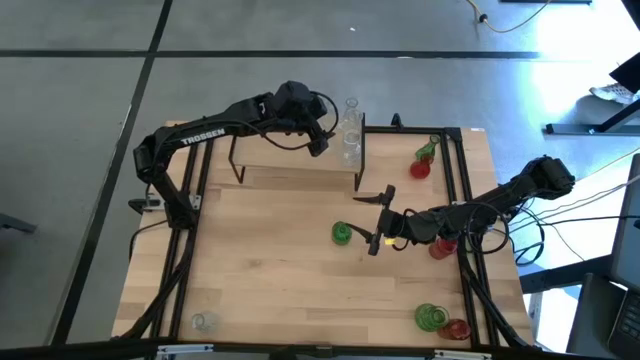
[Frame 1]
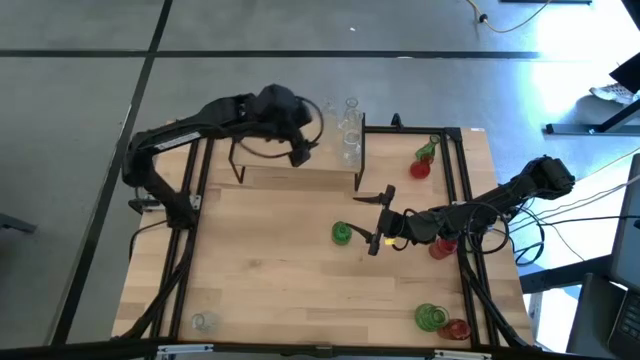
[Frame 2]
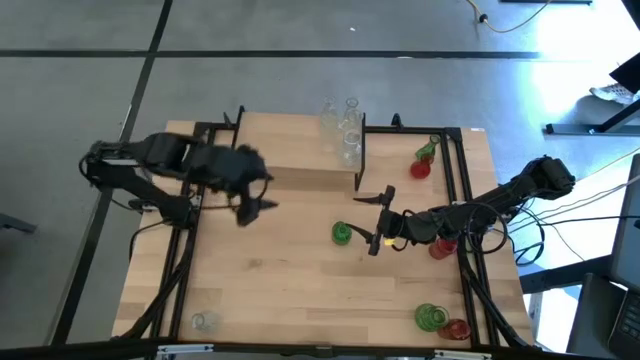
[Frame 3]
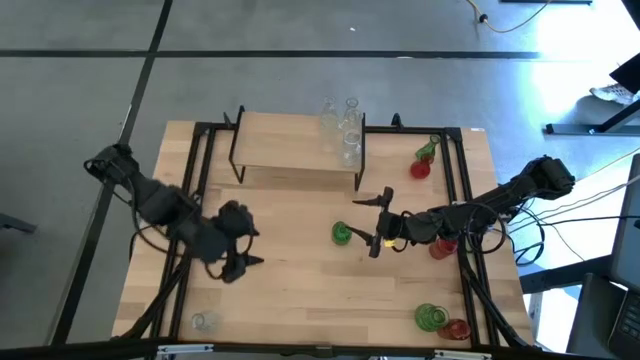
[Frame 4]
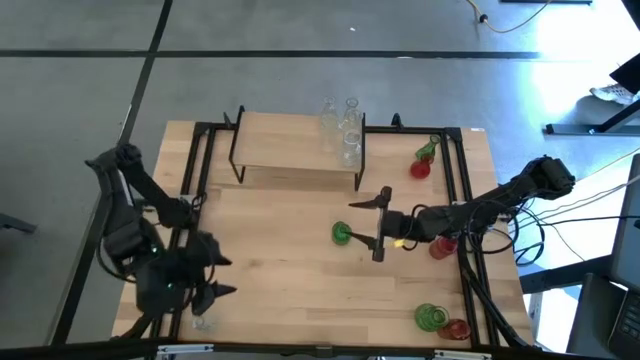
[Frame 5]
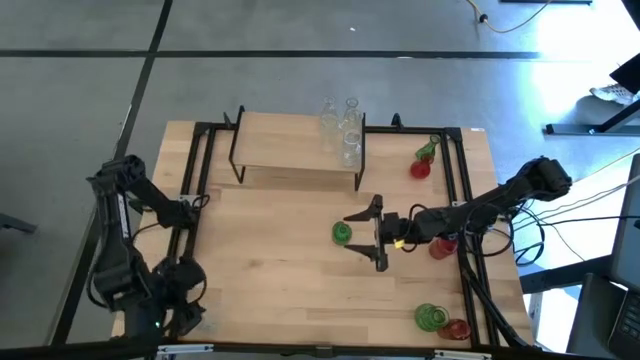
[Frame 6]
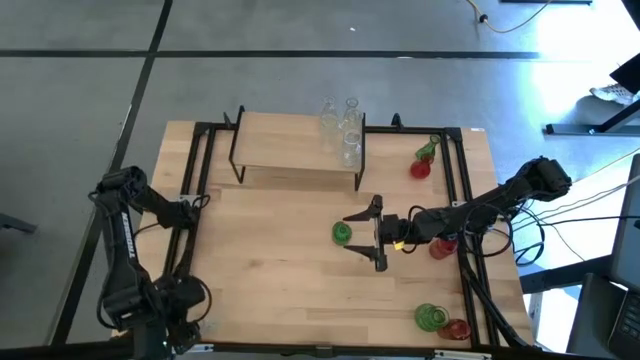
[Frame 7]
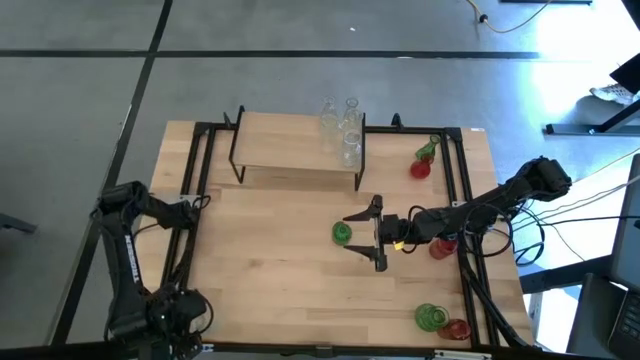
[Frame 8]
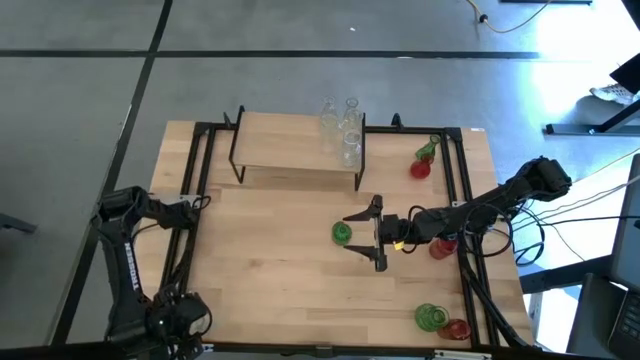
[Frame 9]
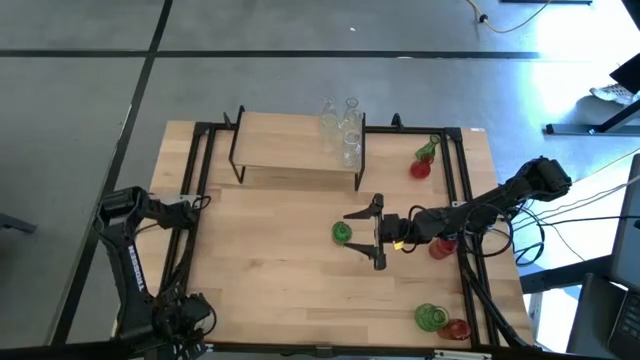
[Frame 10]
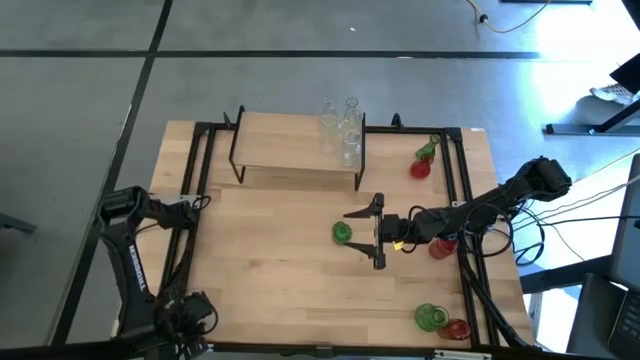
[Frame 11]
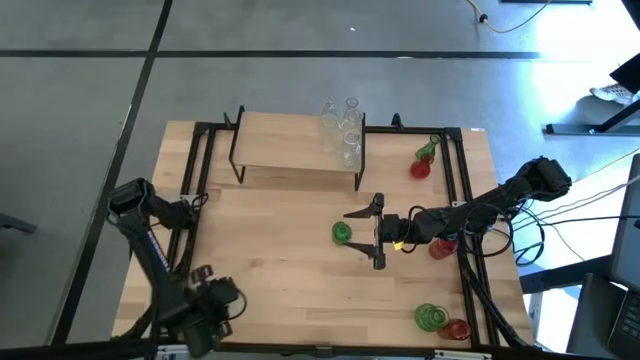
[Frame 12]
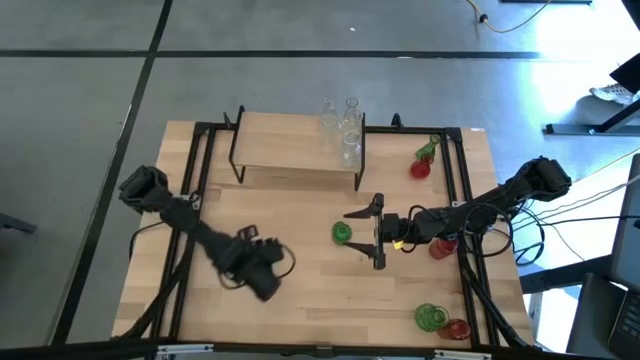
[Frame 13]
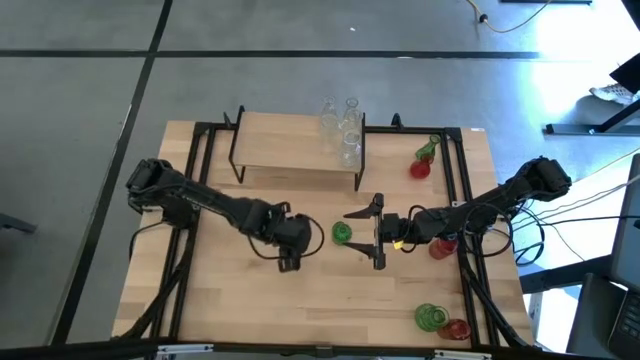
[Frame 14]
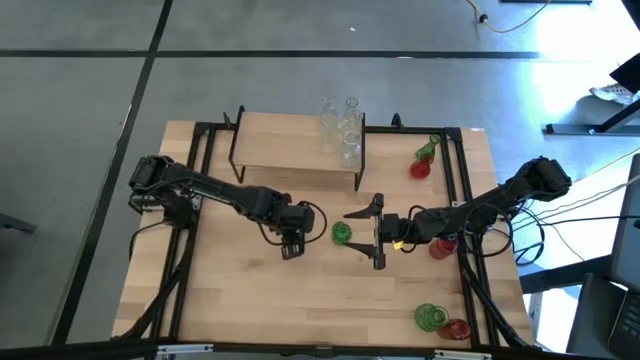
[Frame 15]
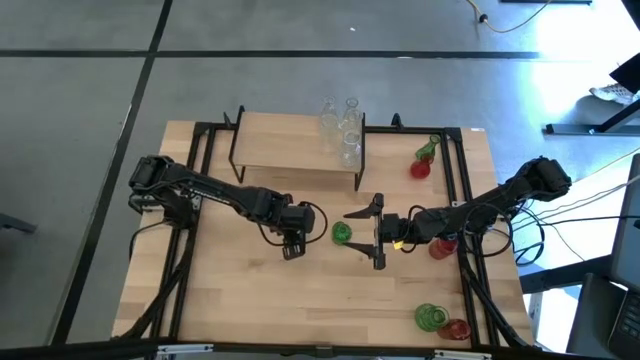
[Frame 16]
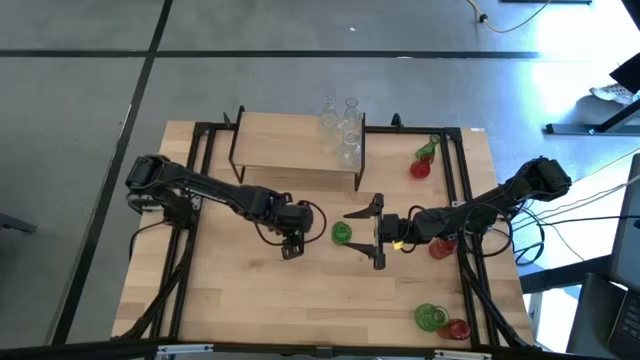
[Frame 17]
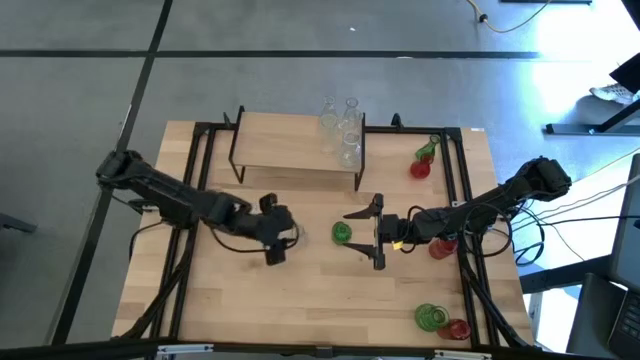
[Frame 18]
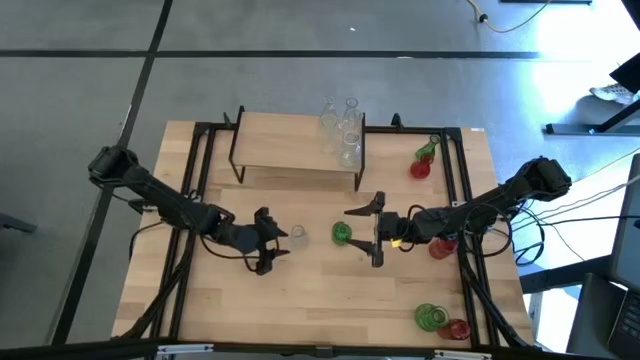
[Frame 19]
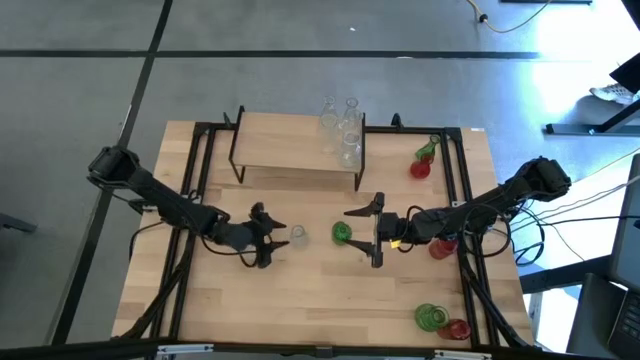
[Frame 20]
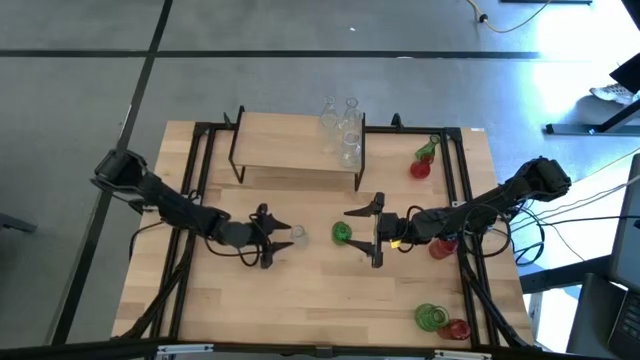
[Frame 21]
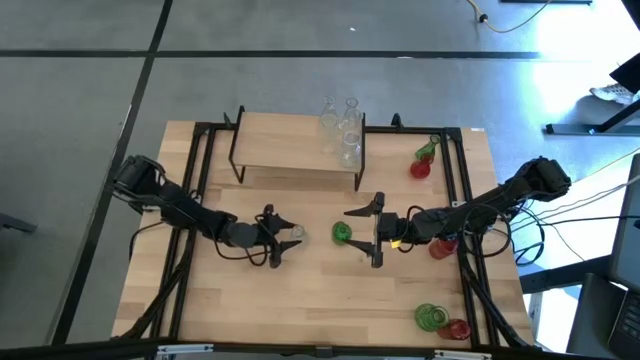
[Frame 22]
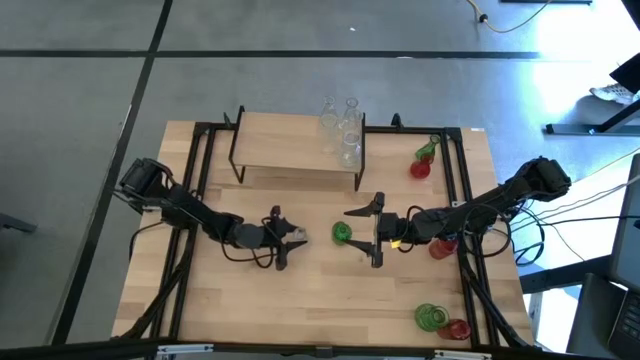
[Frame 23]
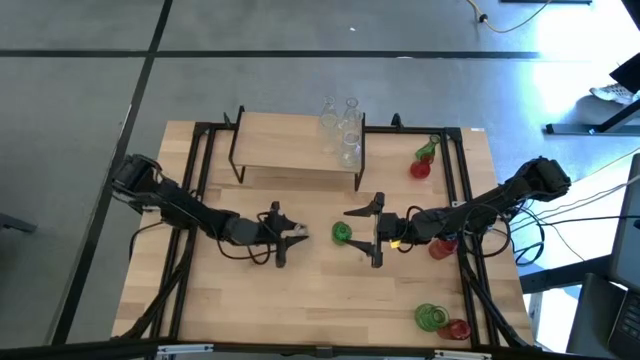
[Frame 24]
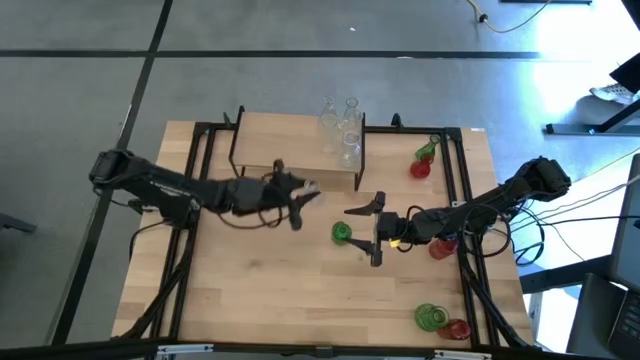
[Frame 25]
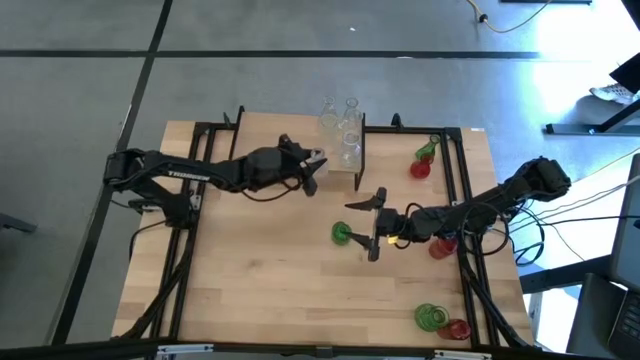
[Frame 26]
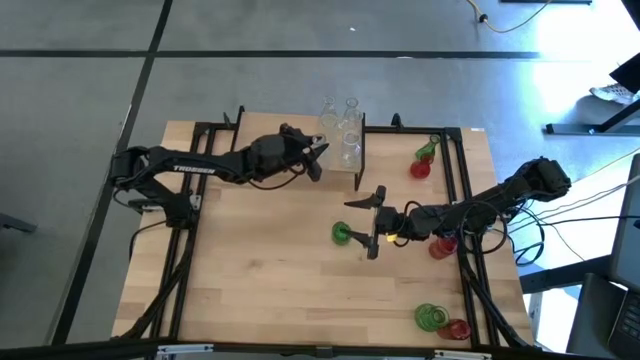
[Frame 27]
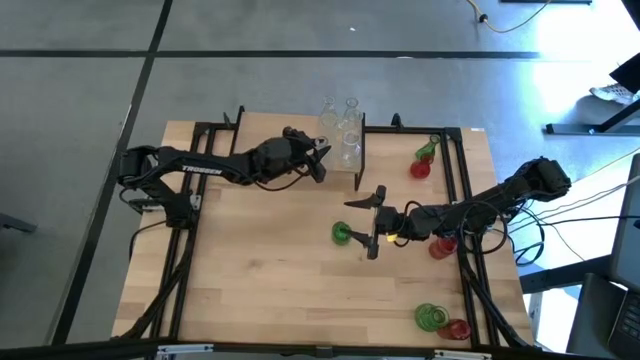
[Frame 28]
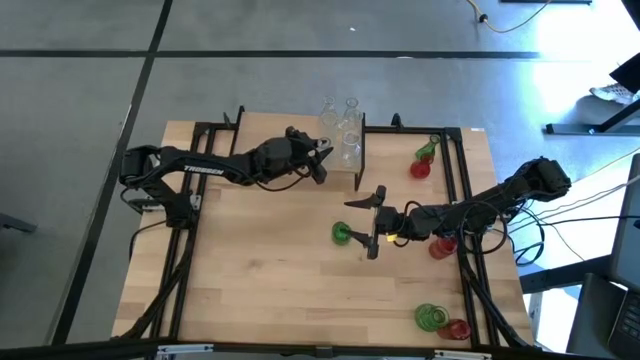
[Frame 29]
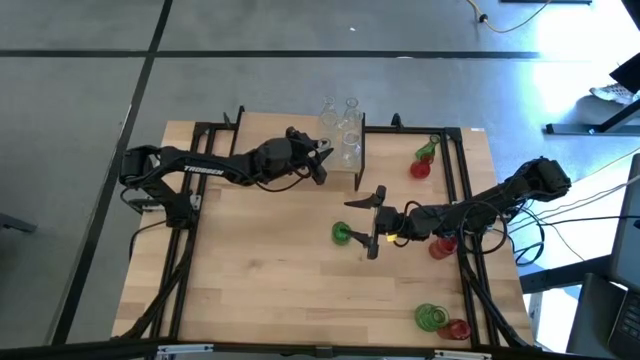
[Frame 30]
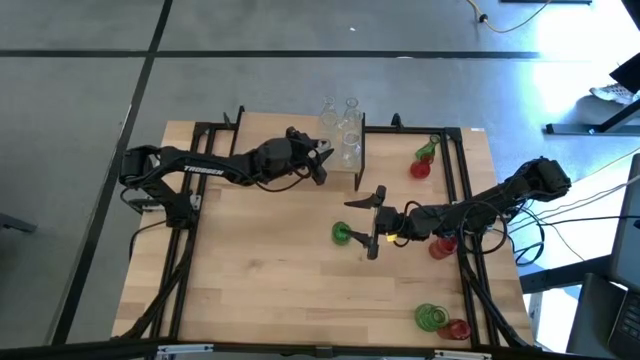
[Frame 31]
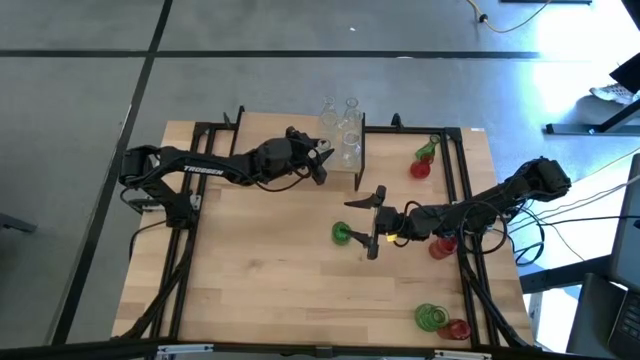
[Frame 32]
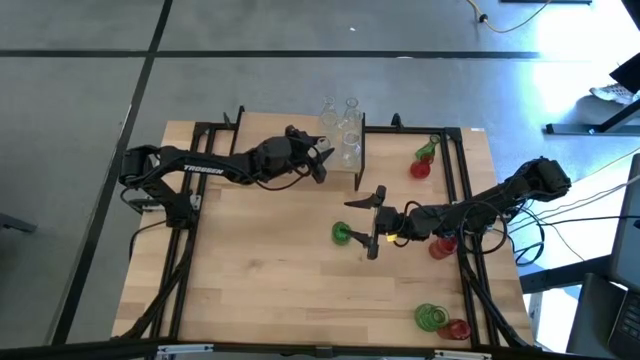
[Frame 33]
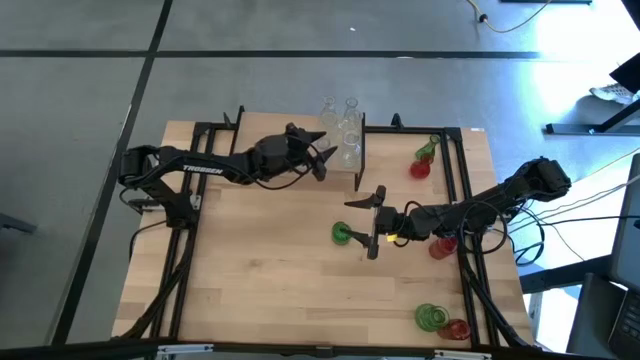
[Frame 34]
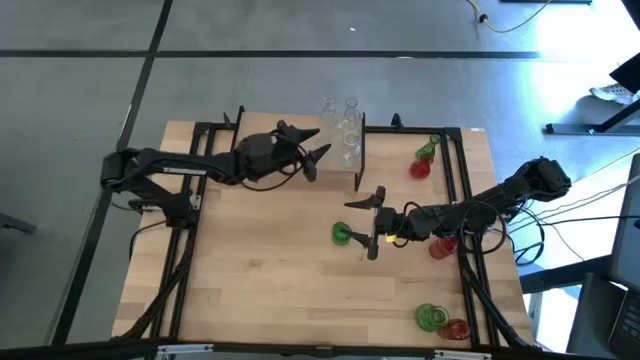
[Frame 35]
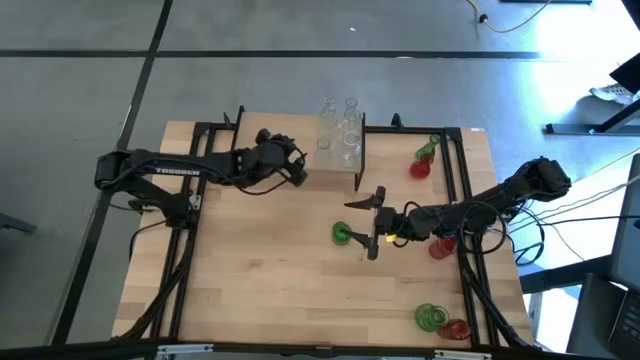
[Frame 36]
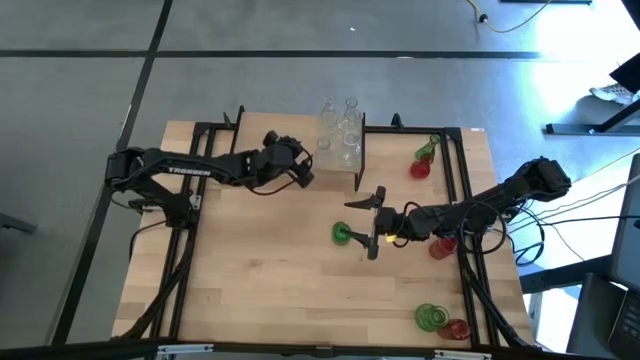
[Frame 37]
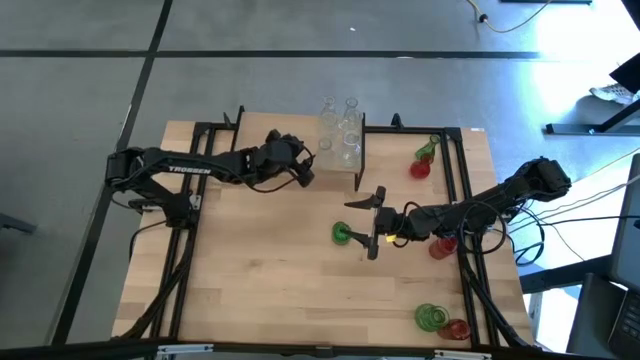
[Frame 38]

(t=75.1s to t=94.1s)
Task: sort vases onto shelf
Put the transparent vase aligned with the other transparent vases on the shelf

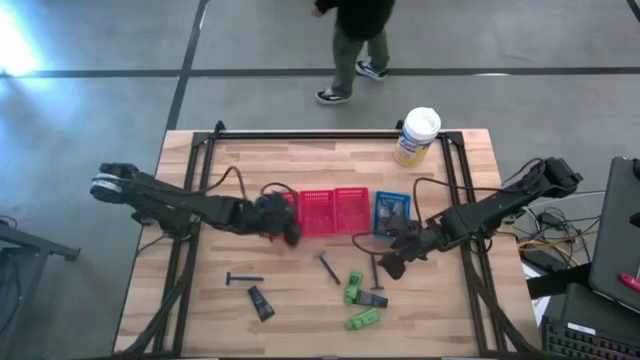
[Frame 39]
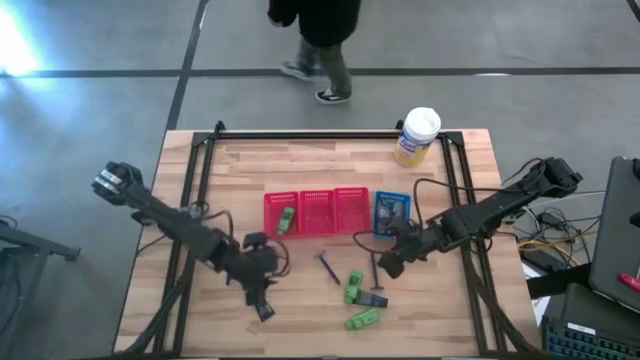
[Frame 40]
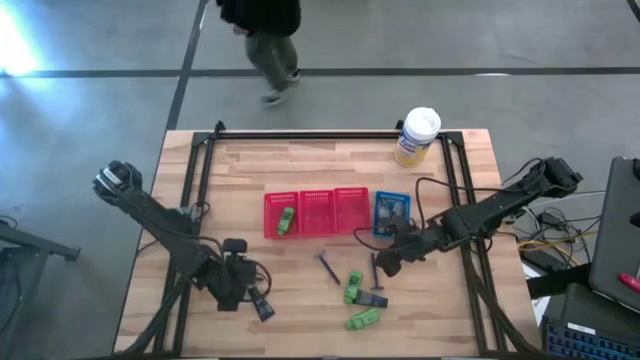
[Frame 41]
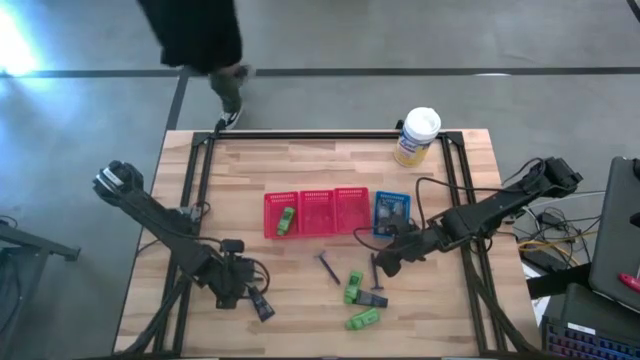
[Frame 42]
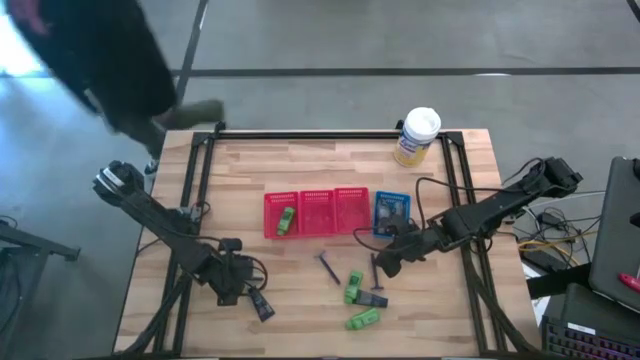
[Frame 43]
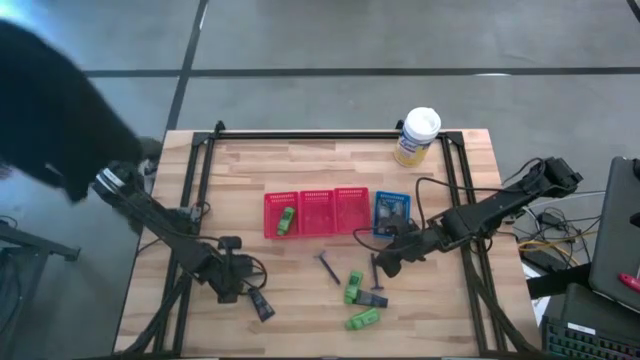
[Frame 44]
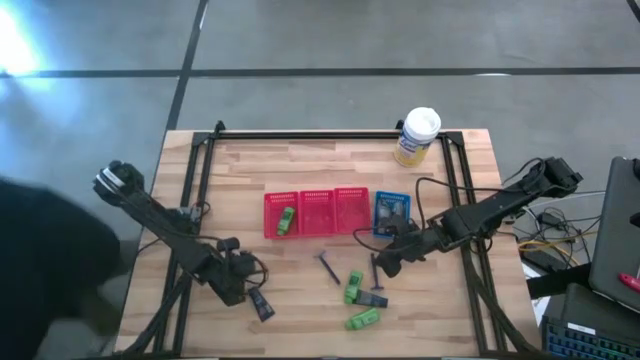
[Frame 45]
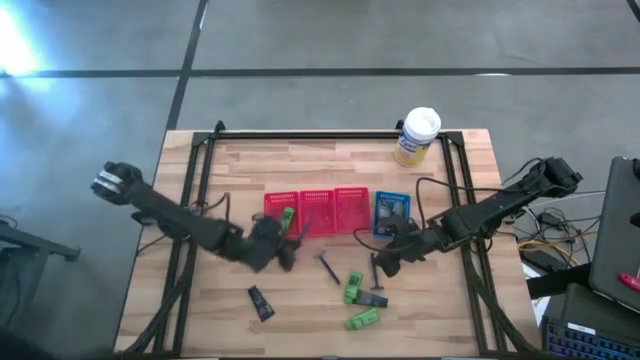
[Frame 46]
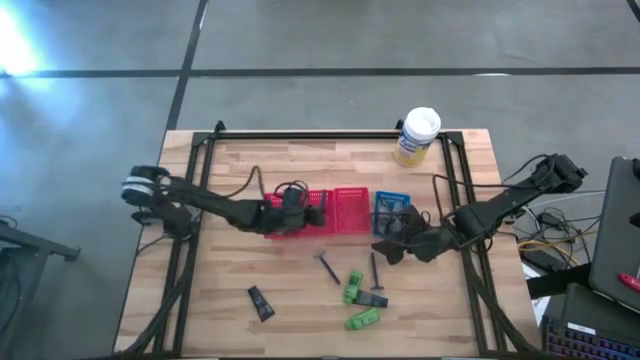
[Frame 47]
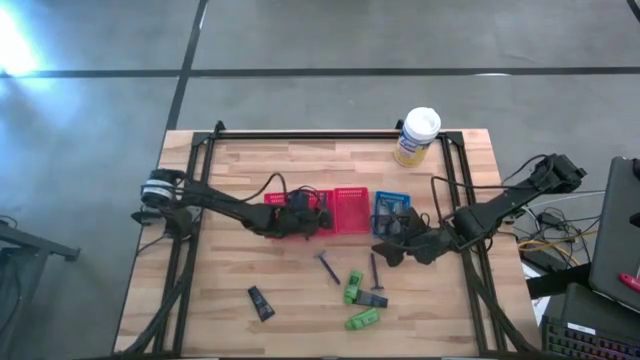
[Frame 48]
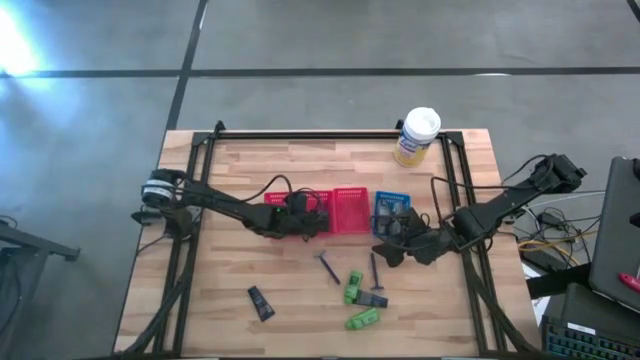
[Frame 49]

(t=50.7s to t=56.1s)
Task: Pick & Place Travel size toiletries
Put the blue razor into the middle red bin
